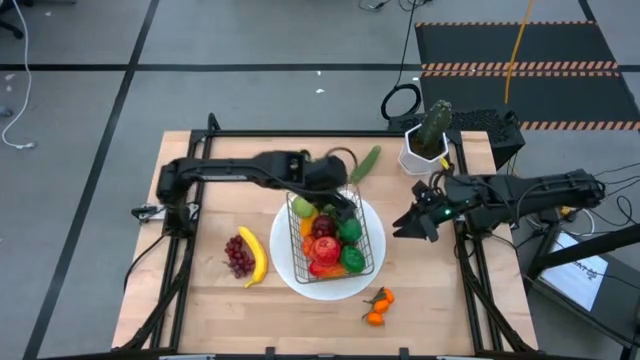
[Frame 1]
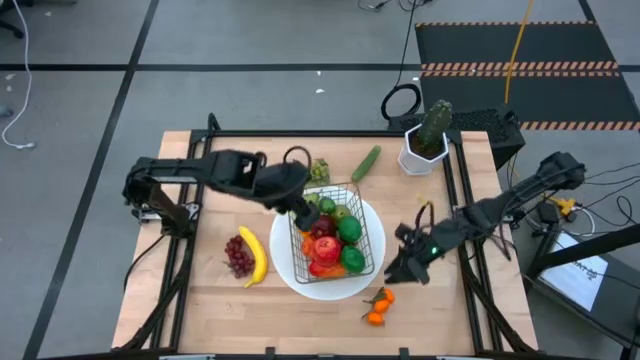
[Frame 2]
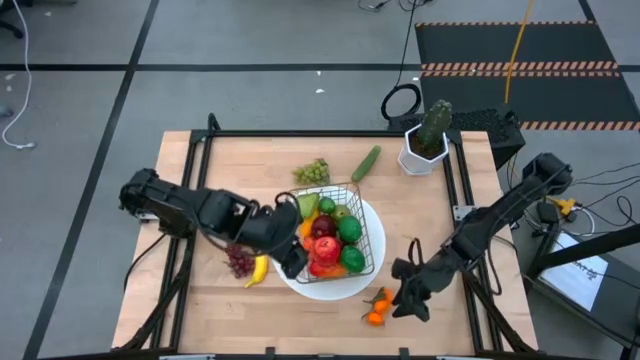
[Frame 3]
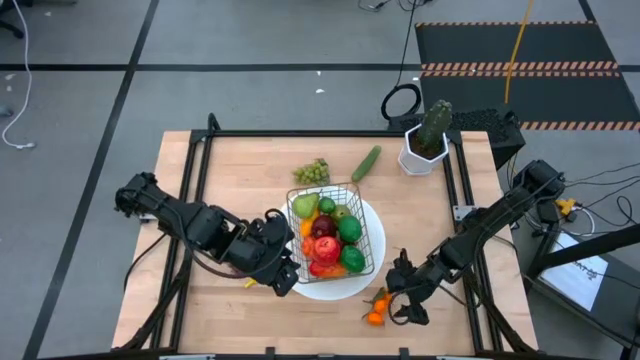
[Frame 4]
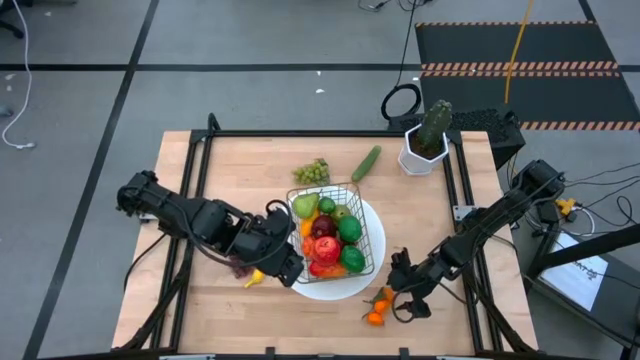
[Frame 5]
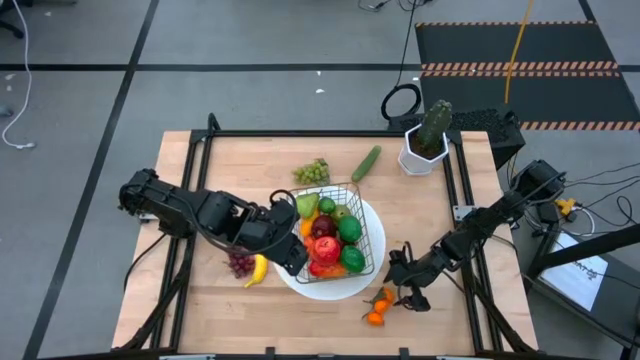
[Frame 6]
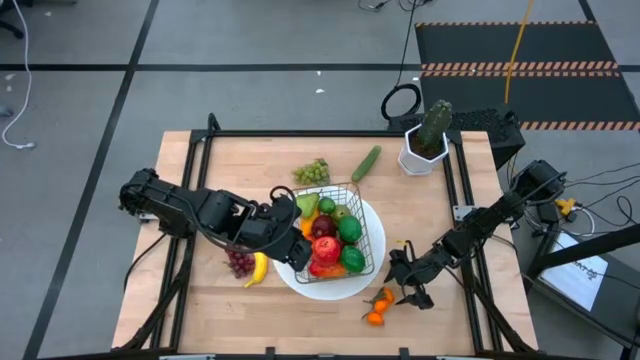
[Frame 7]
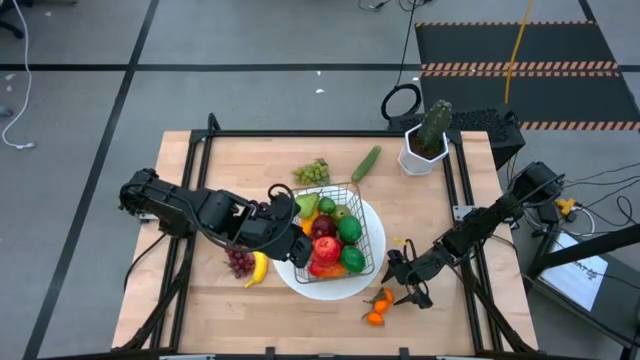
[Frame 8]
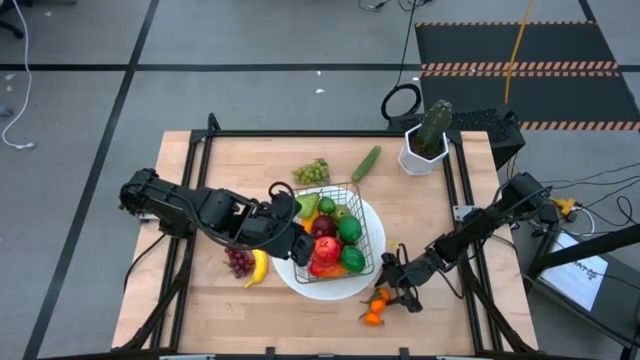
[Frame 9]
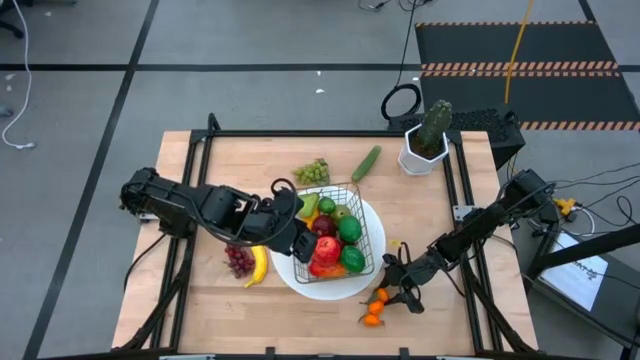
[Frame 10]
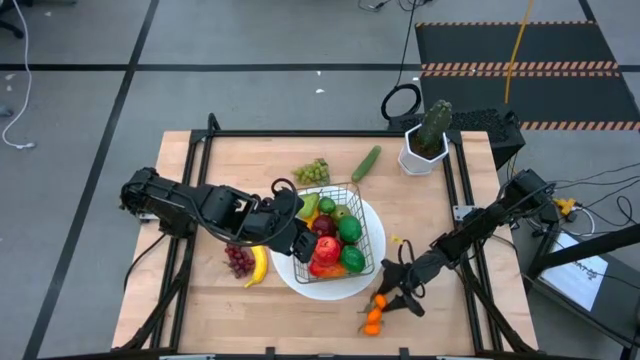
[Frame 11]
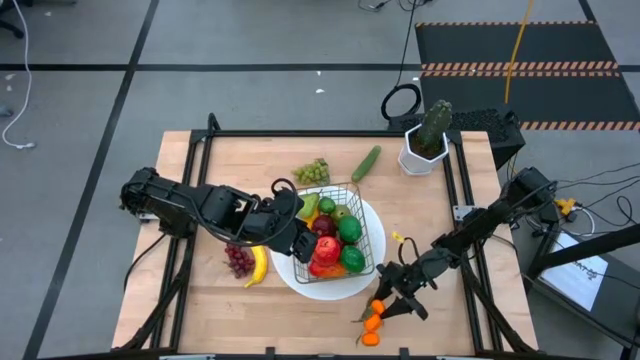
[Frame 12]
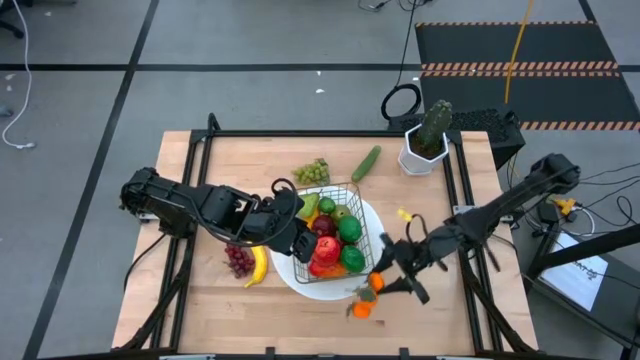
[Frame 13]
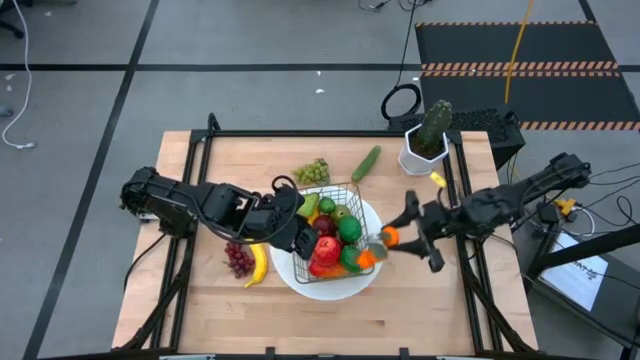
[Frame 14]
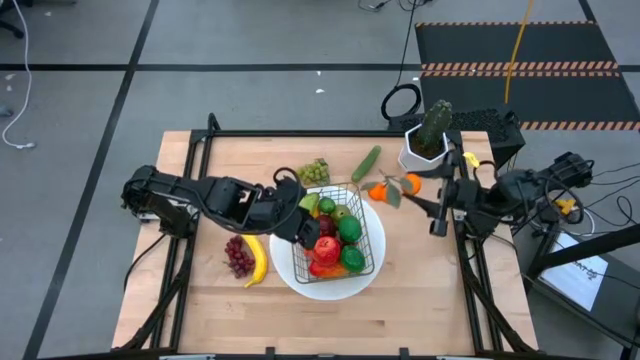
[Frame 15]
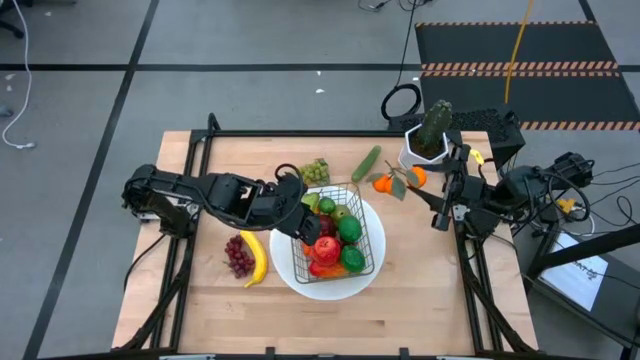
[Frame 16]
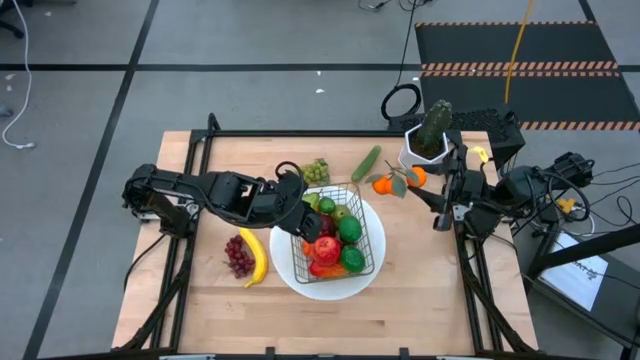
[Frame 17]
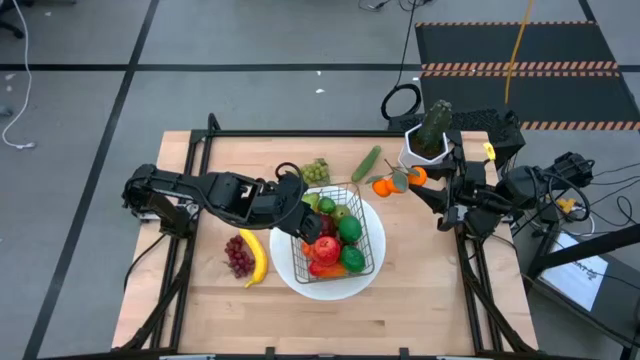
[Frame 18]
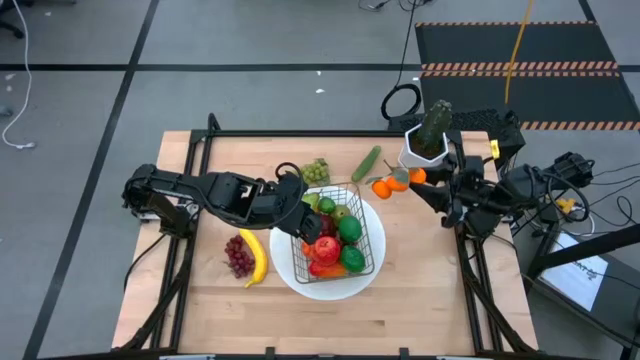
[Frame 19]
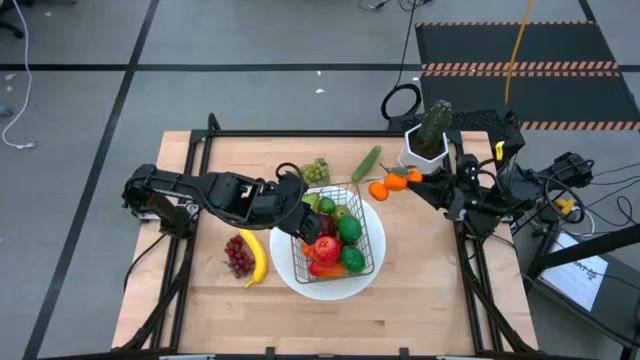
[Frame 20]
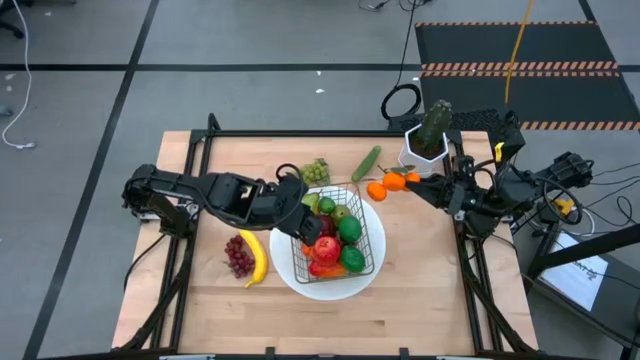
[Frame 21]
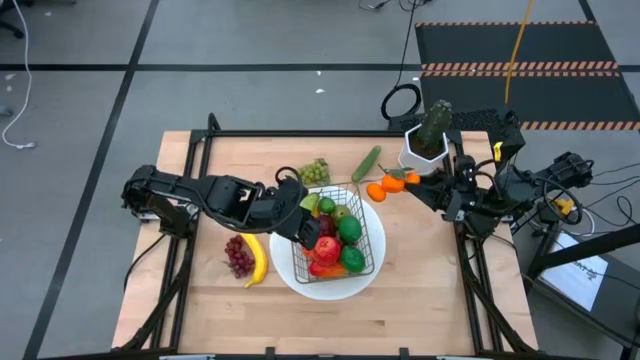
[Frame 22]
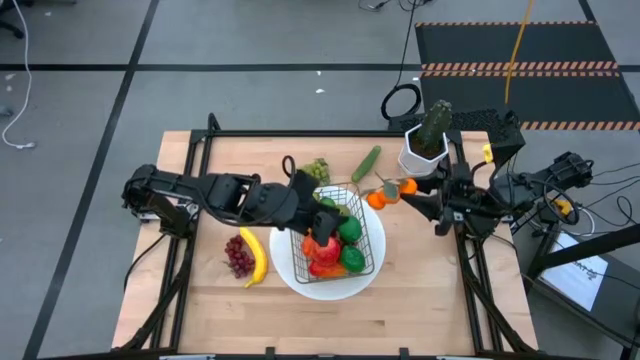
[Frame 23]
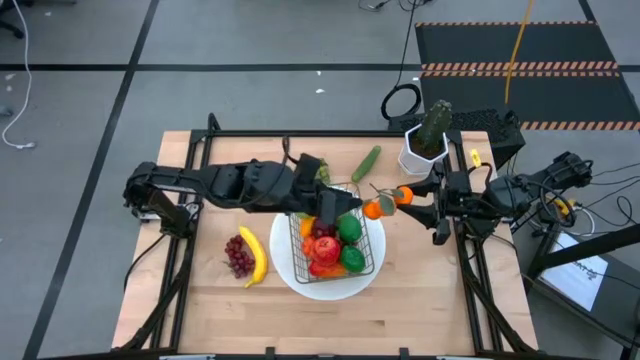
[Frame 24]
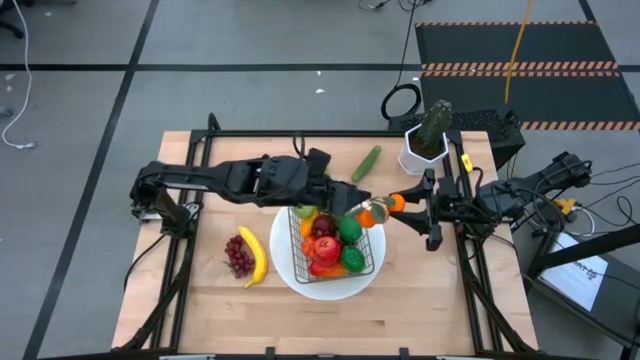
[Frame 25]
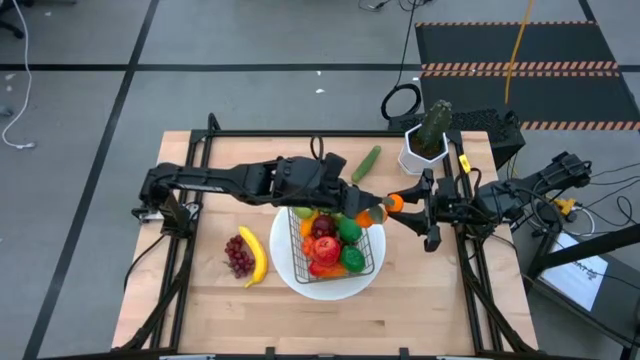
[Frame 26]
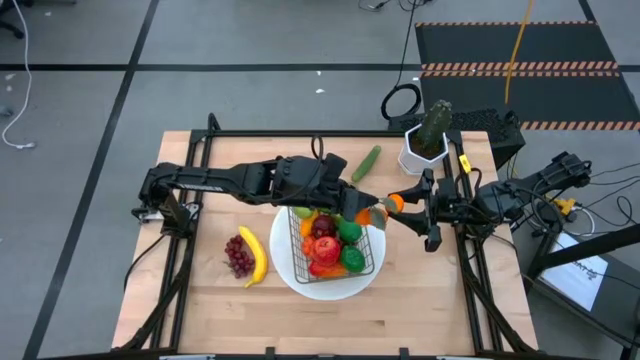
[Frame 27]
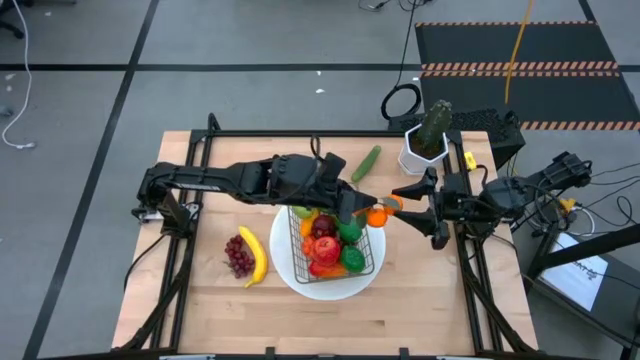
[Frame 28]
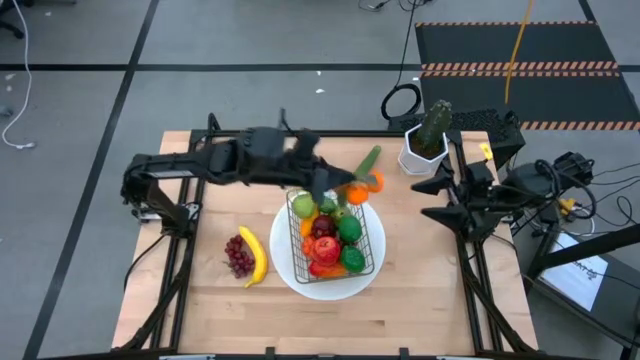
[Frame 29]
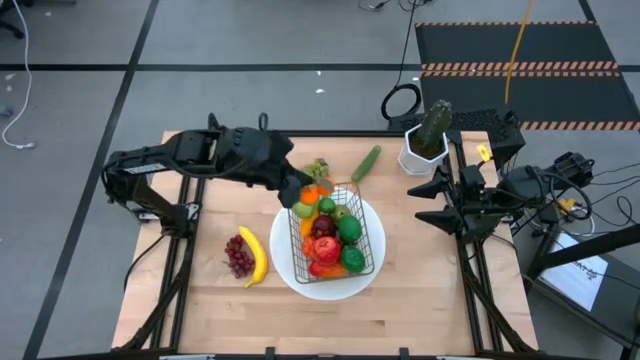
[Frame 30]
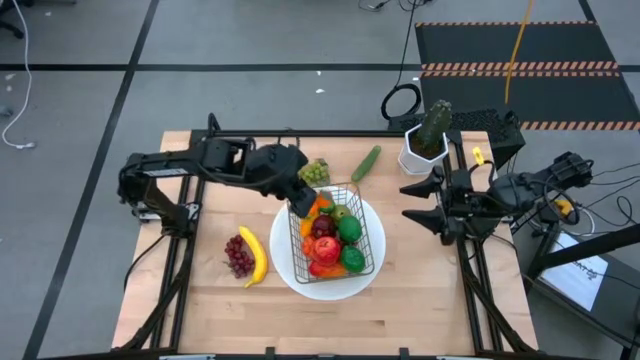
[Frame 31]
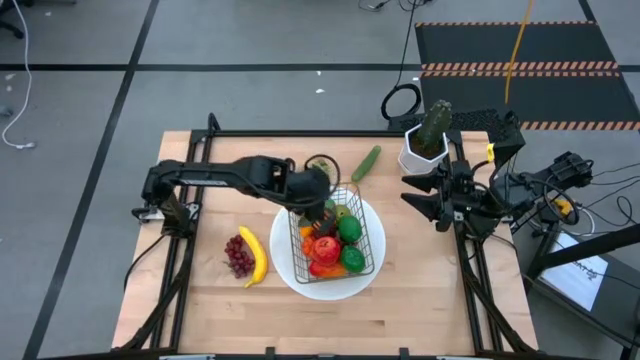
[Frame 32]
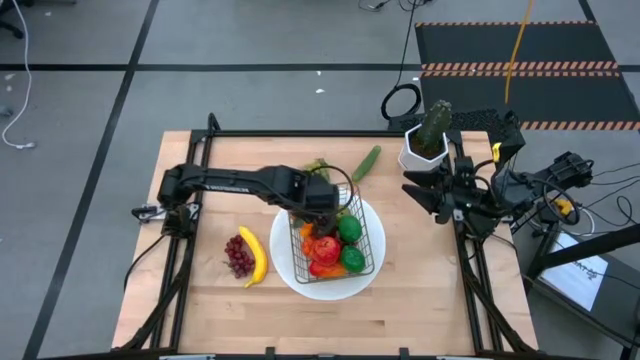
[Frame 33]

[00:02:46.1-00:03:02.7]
Task: Build produce basket
Put the oranges into the black wire basket

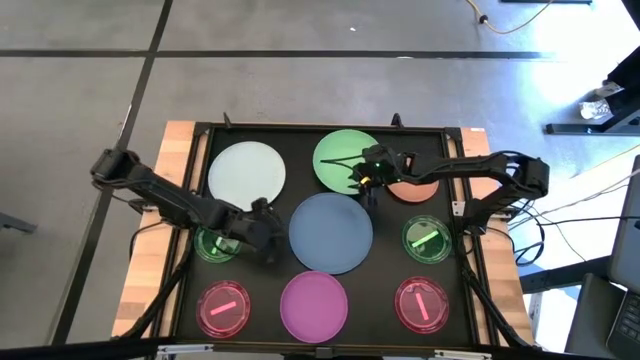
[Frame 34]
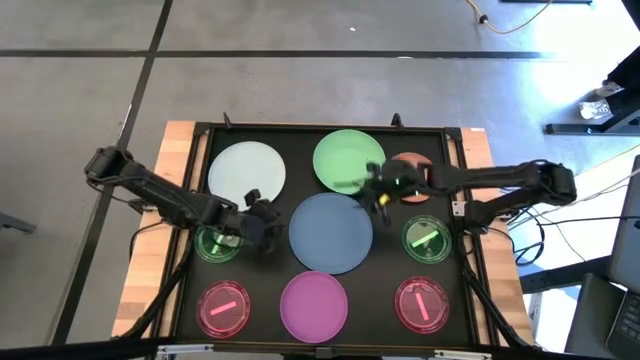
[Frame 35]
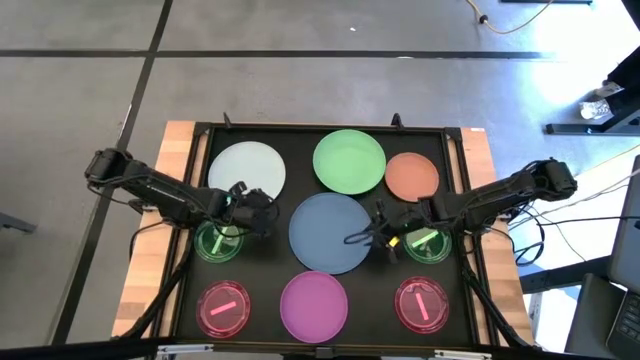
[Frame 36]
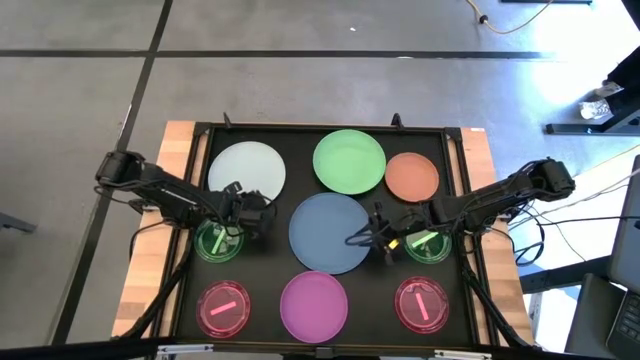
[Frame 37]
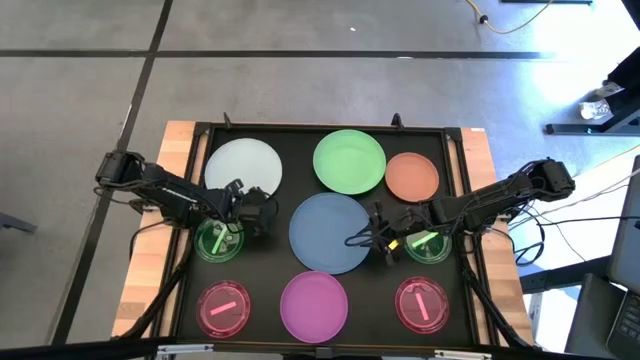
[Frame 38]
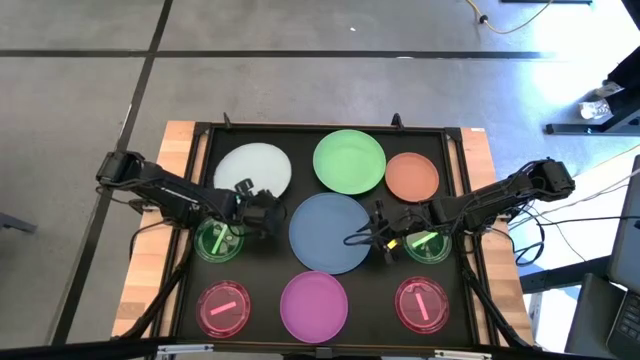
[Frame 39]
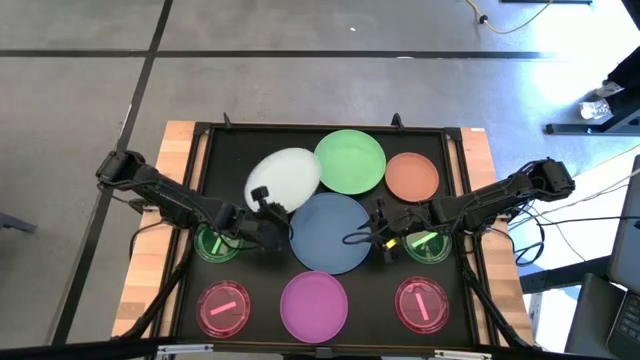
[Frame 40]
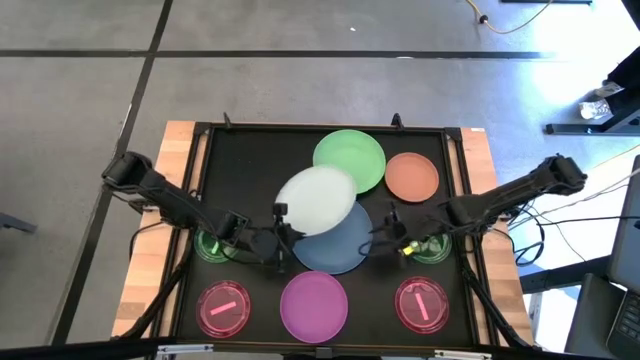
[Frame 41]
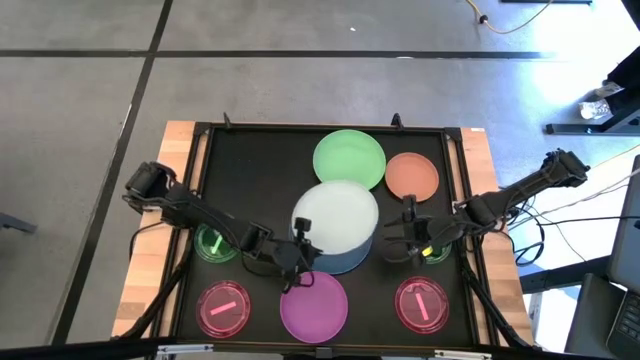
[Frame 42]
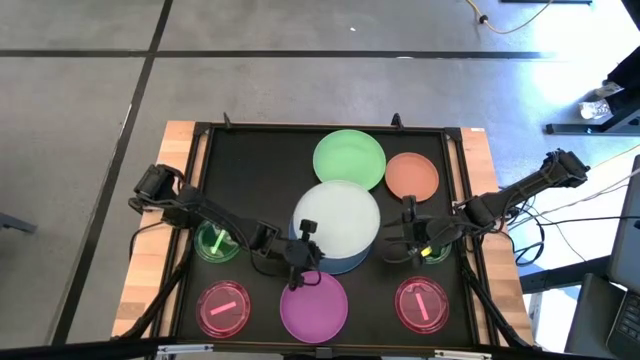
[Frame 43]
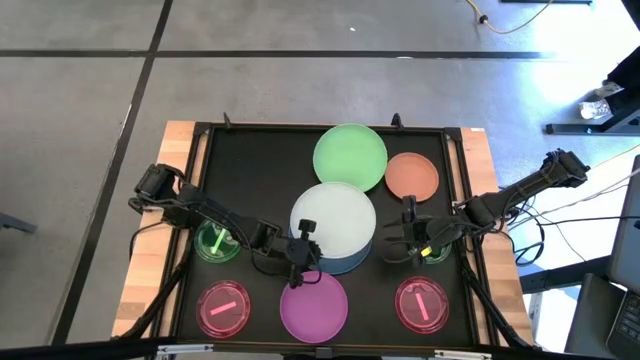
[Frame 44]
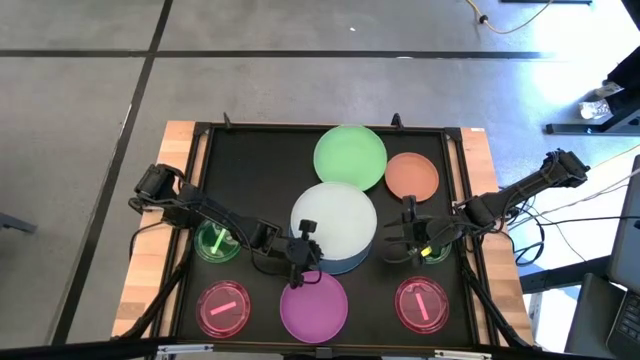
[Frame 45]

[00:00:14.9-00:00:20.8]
Task: Stack plastic plates
Stack the light blue plate on the blue plate
